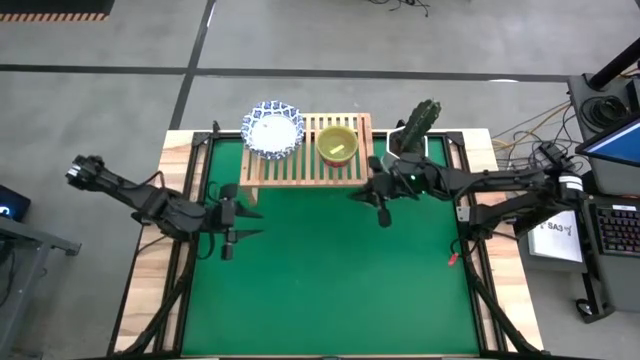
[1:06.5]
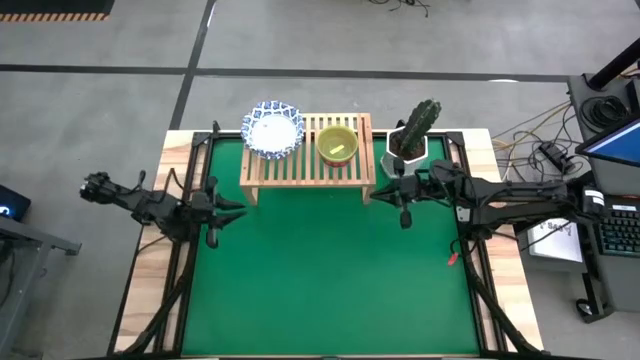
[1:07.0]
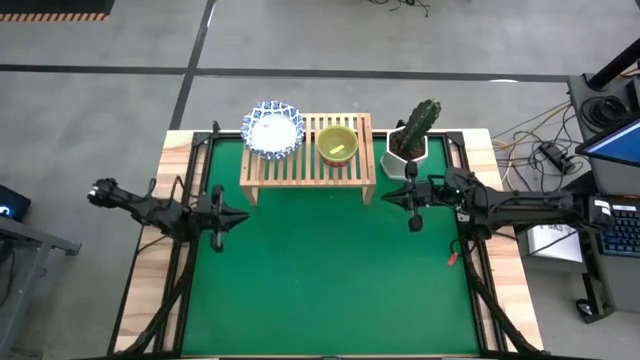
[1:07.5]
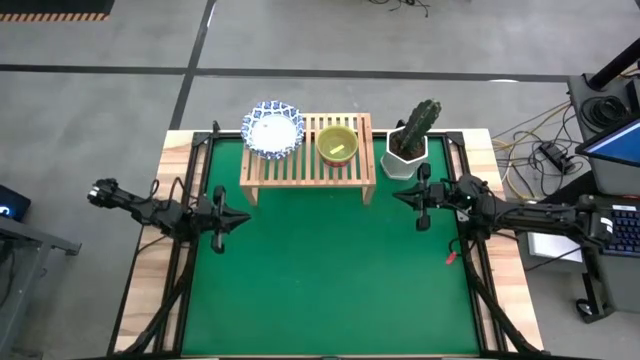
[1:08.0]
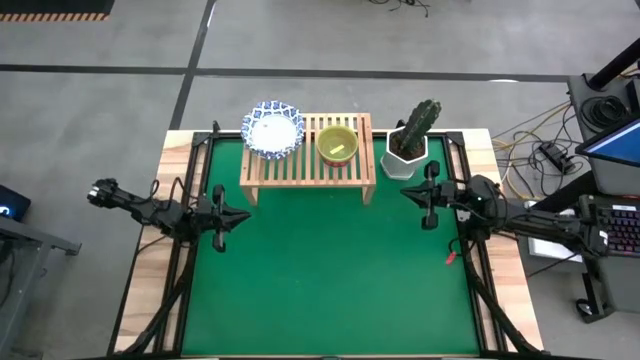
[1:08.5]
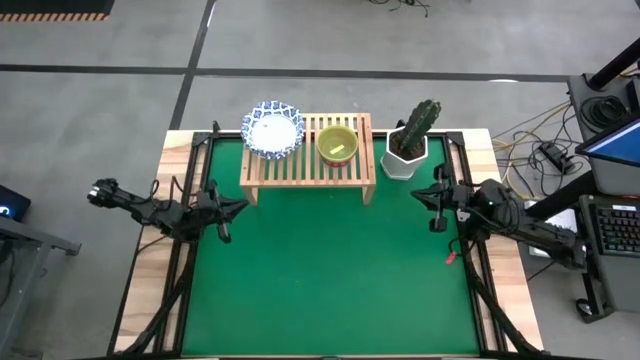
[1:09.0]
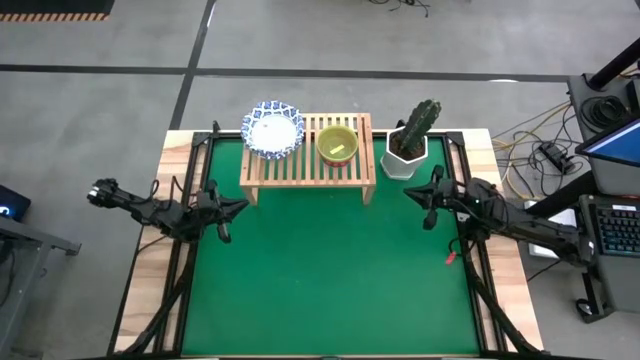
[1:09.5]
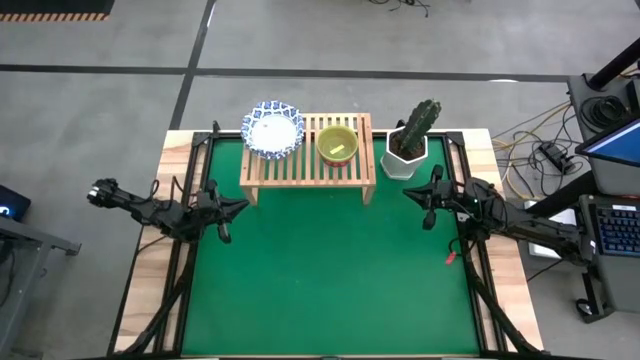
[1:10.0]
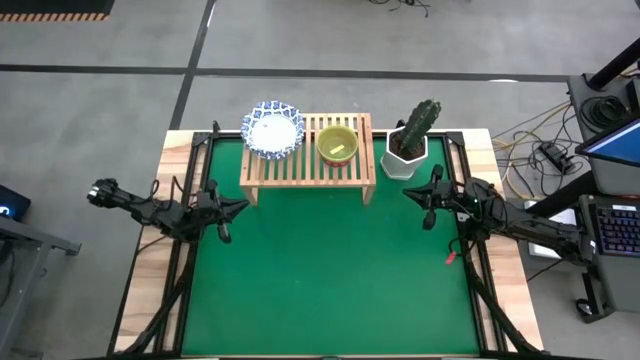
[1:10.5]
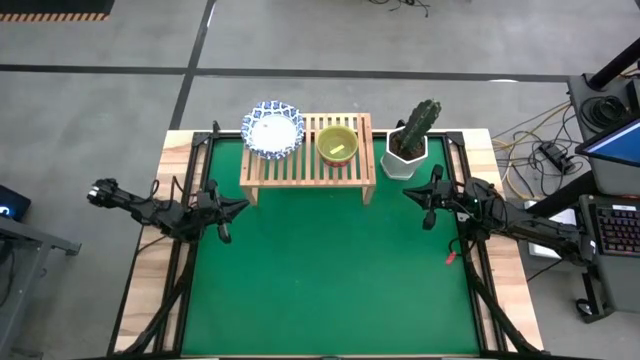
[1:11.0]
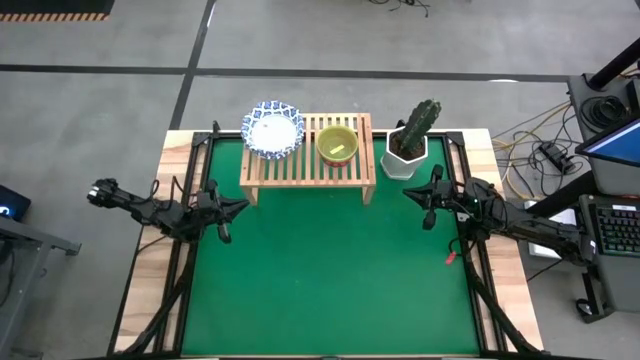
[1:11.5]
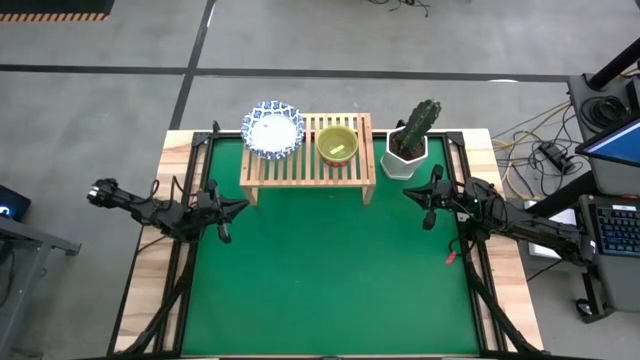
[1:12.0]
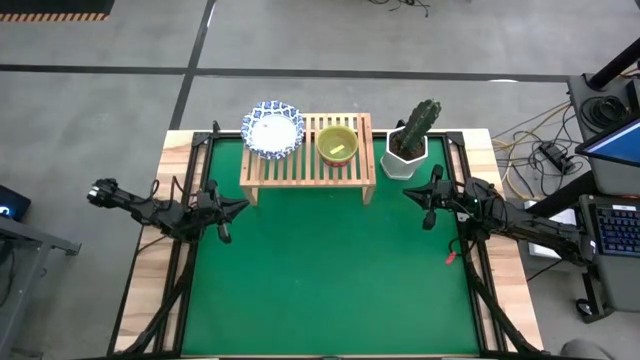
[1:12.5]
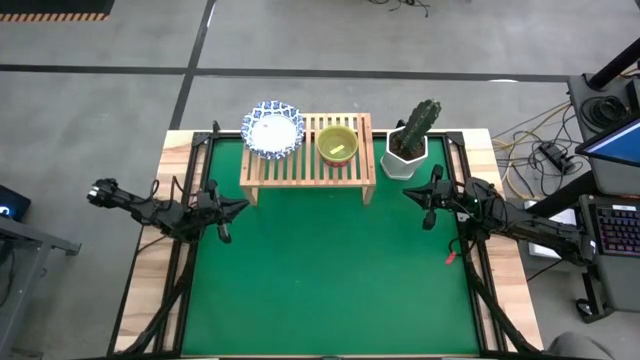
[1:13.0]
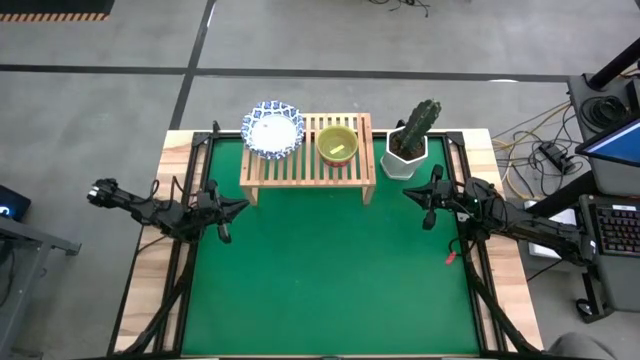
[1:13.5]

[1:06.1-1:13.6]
Task: Place and stack bowls onto a shelf
Return to Home Position

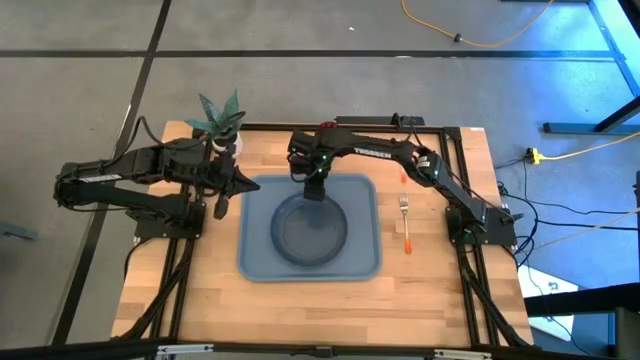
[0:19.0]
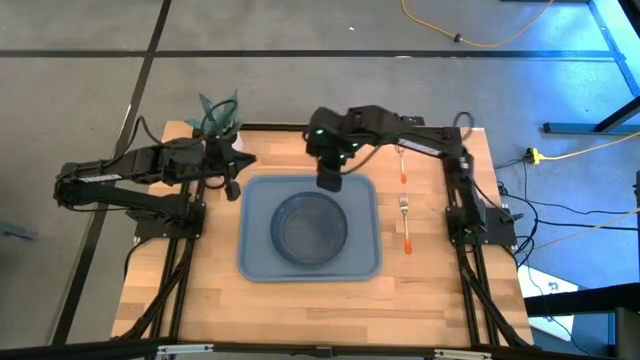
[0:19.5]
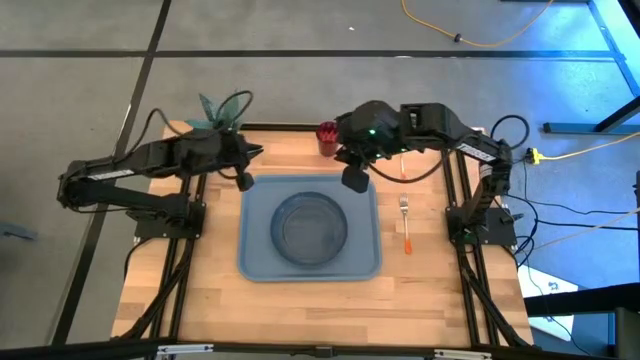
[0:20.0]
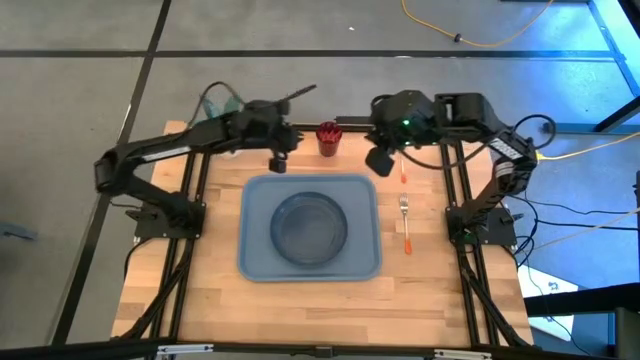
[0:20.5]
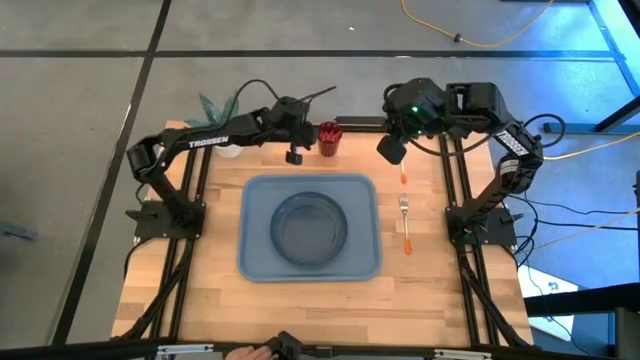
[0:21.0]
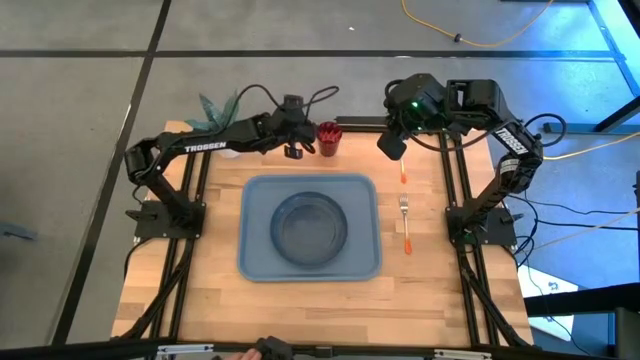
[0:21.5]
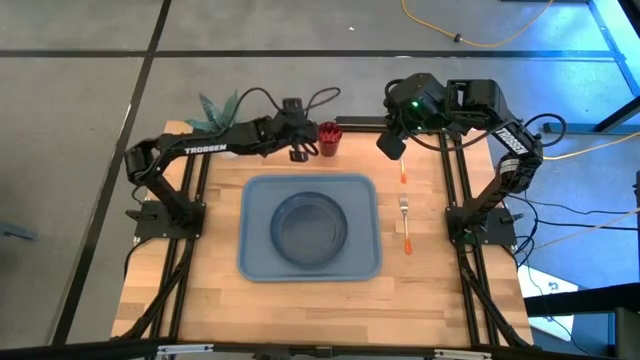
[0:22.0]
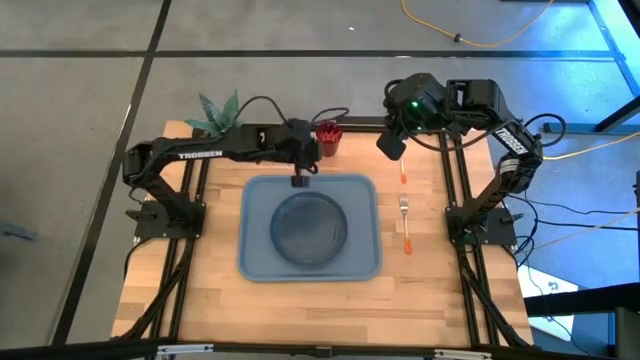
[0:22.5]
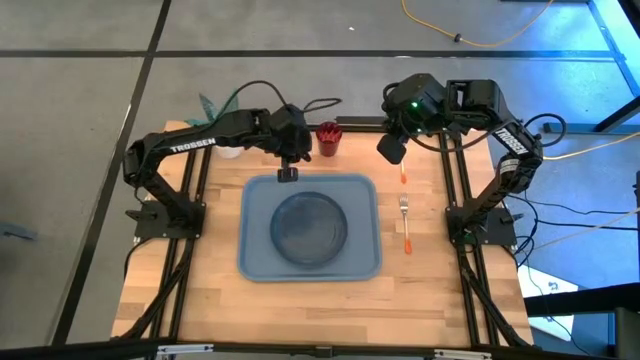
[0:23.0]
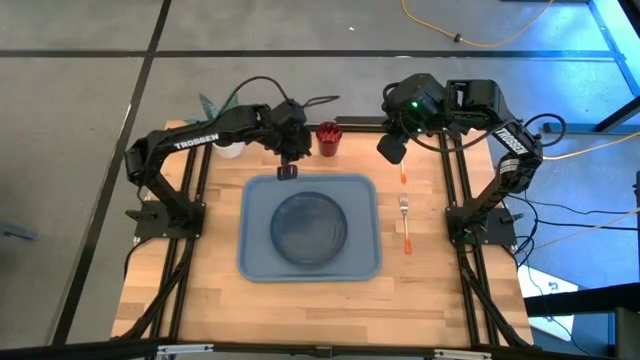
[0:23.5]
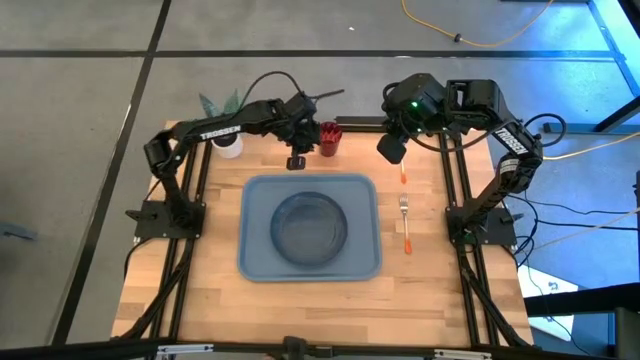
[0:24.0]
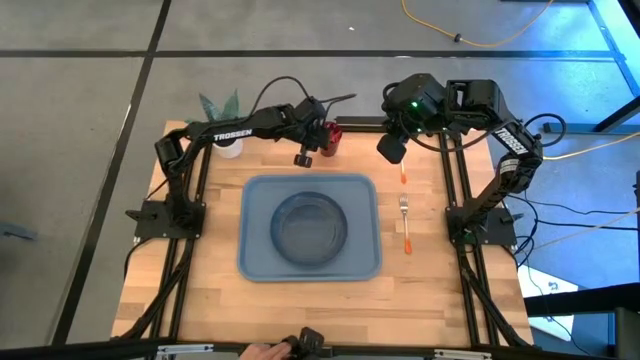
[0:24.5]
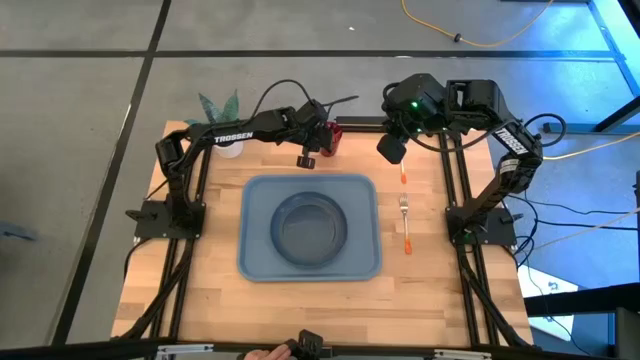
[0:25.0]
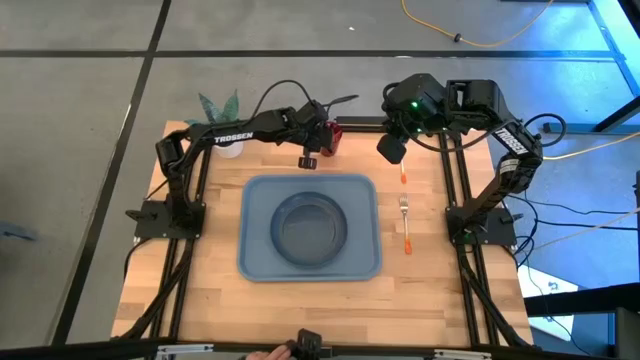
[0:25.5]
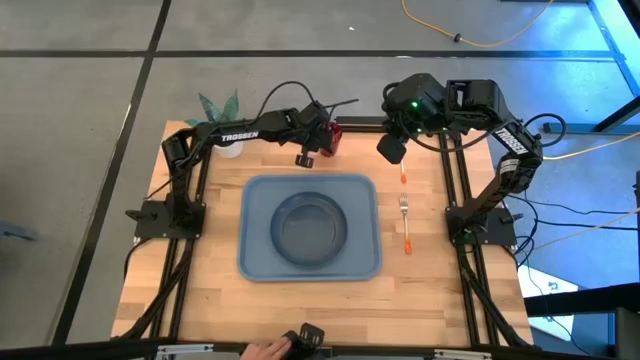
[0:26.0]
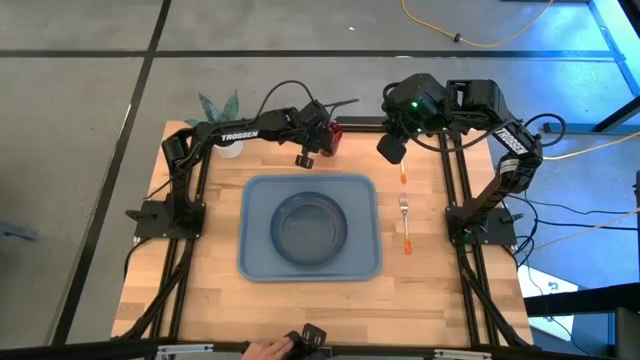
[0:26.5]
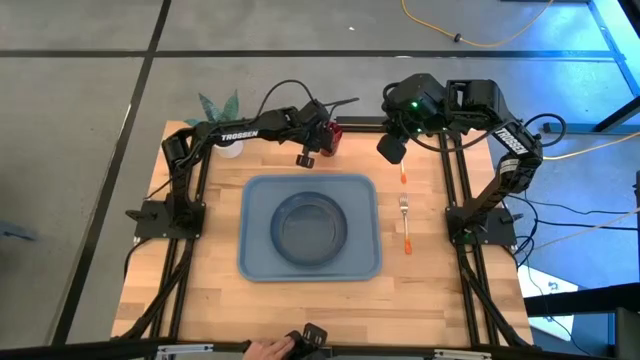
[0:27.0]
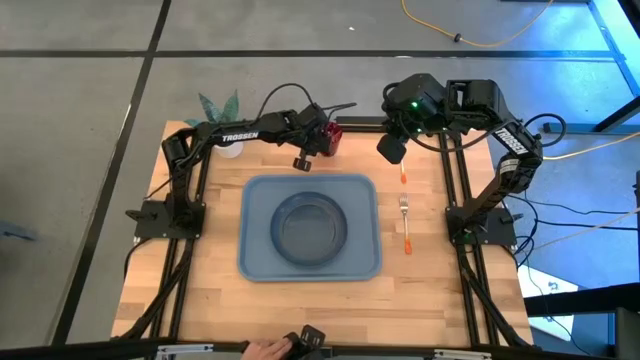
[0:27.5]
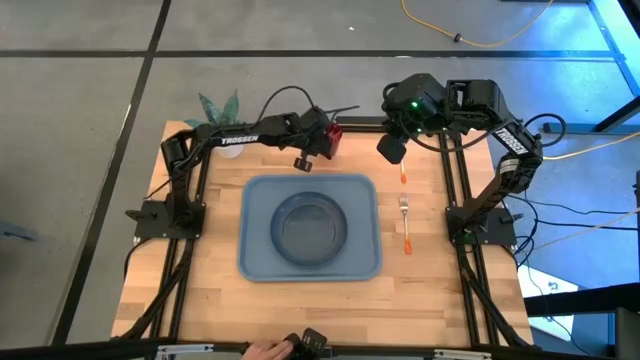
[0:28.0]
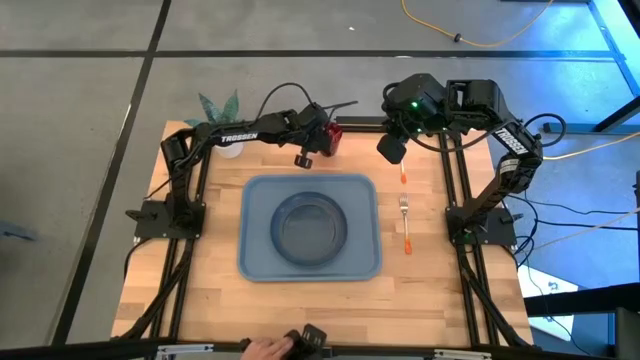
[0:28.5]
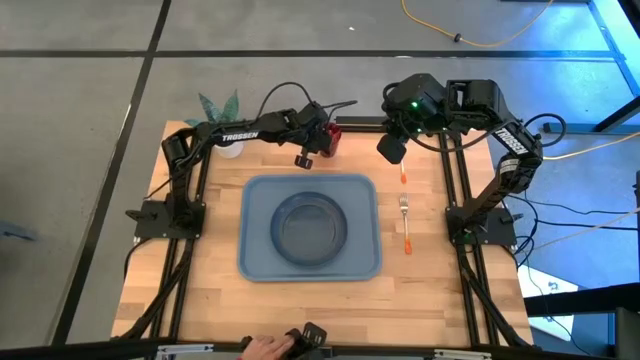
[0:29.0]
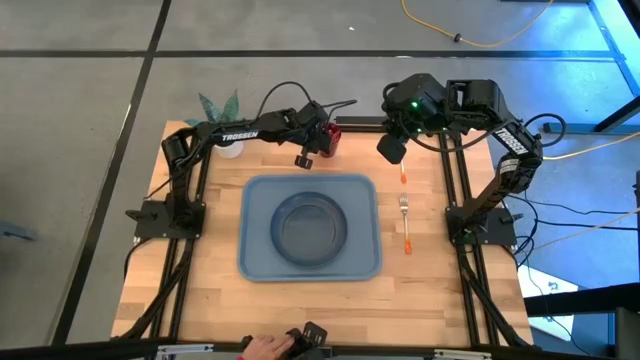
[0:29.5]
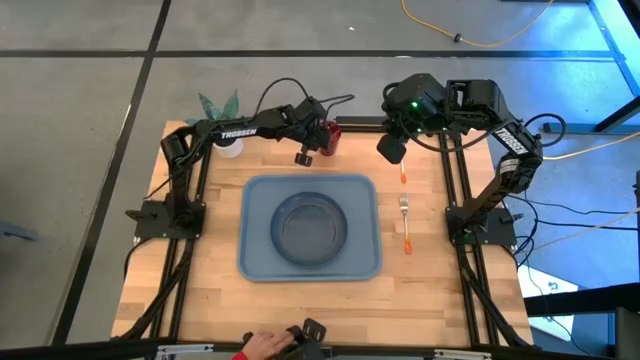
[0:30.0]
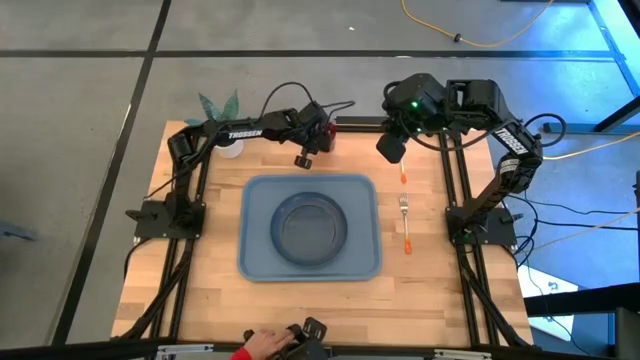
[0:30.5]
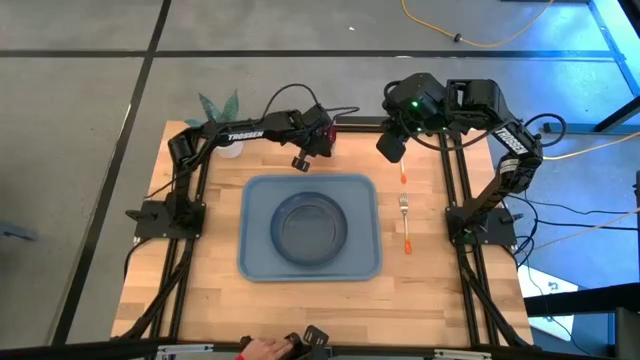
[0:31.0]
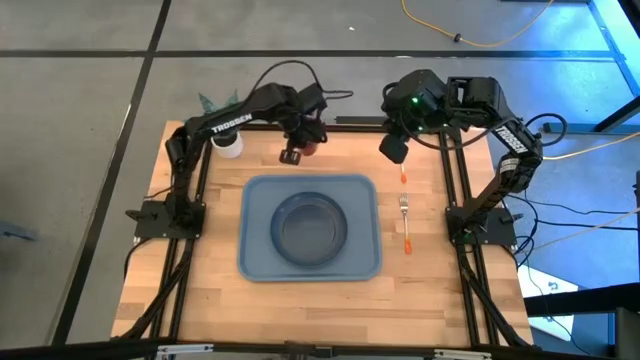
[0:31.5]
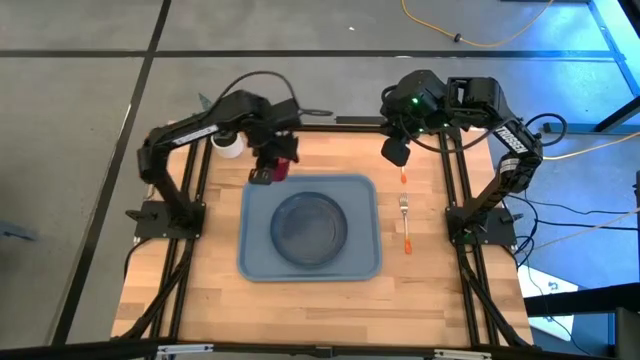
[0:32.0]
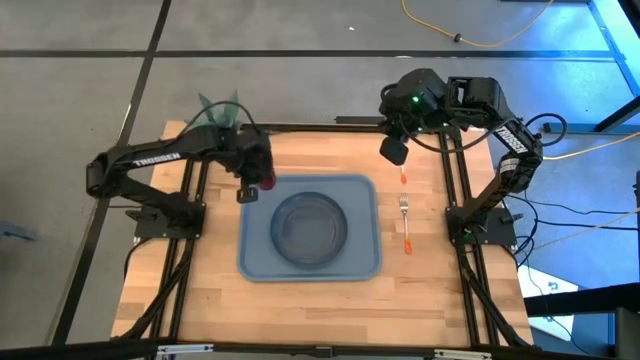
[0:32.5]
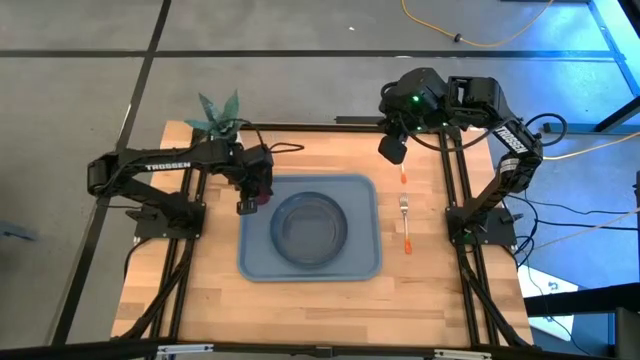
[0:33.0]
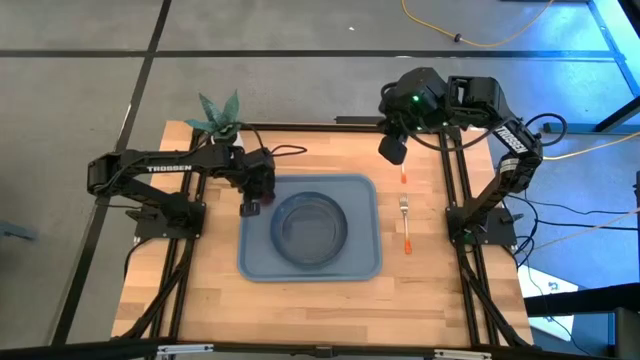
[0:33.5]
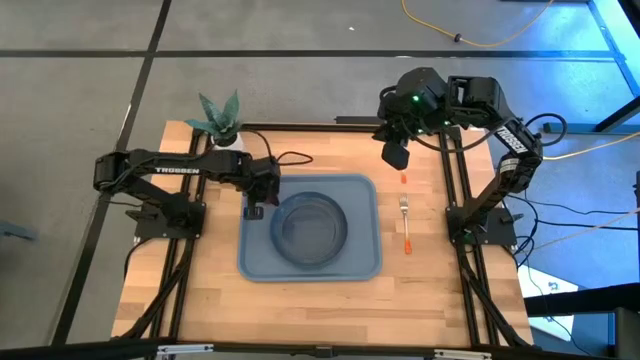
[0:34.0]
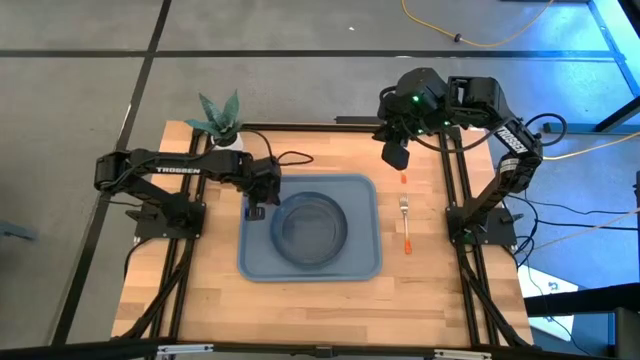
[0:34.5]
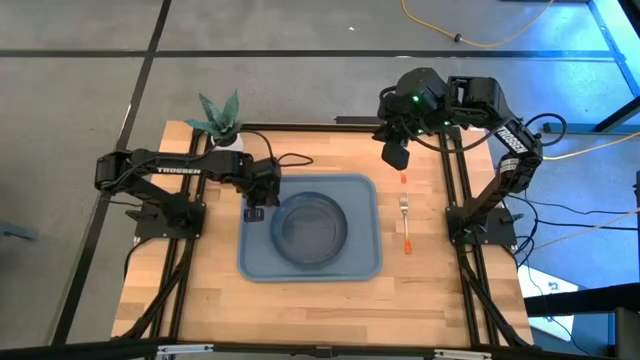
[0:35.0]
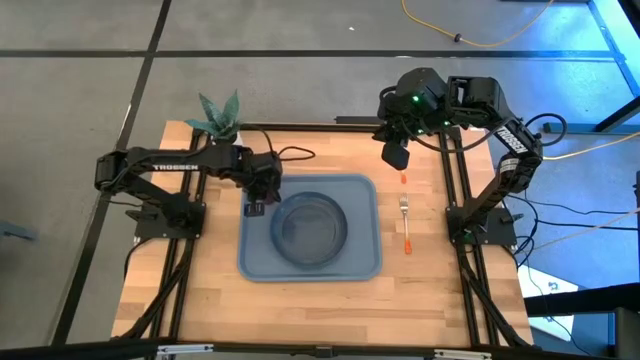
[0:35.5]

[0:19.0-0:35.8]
Task: Pick and place plate/cup/fork/spoon on tray
Put the red cup on the blue tray, to the top left of the dark blue plate
